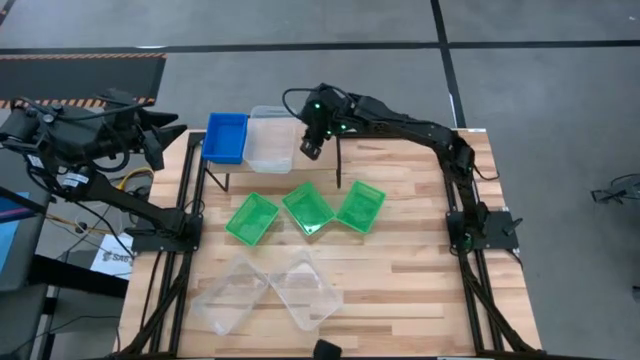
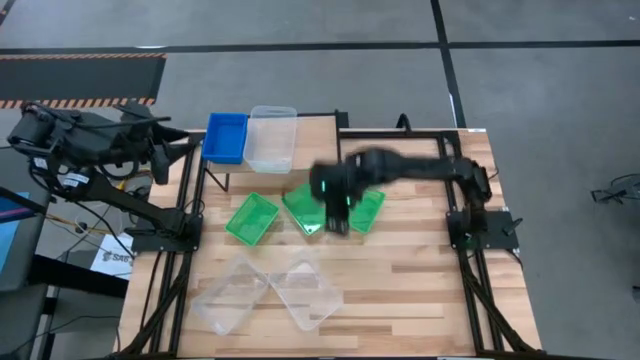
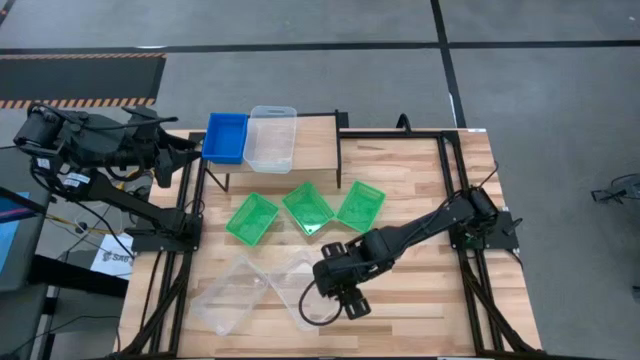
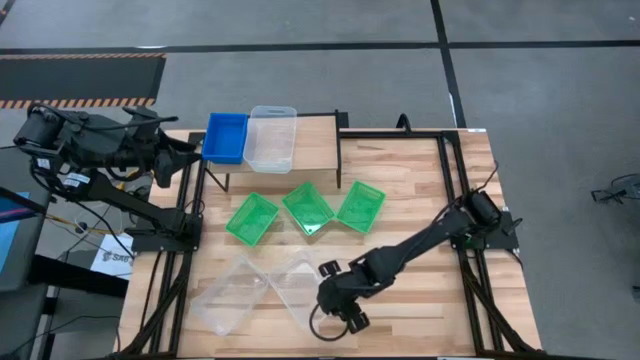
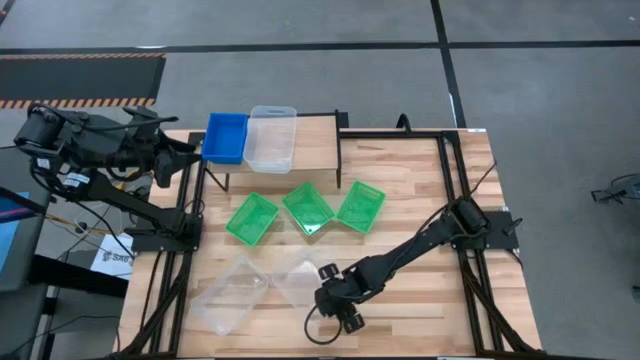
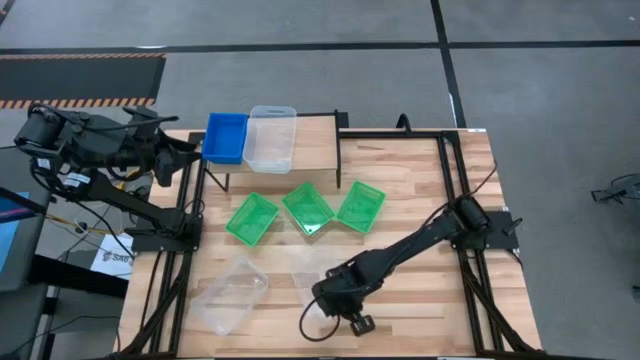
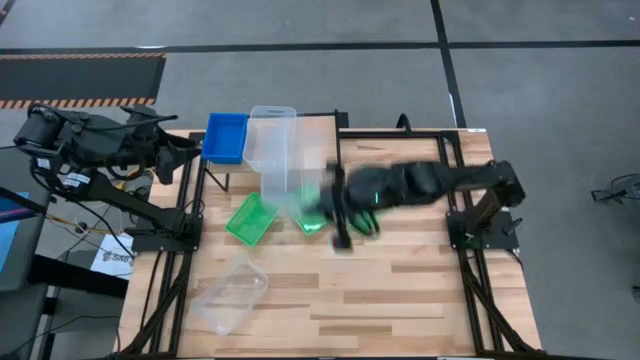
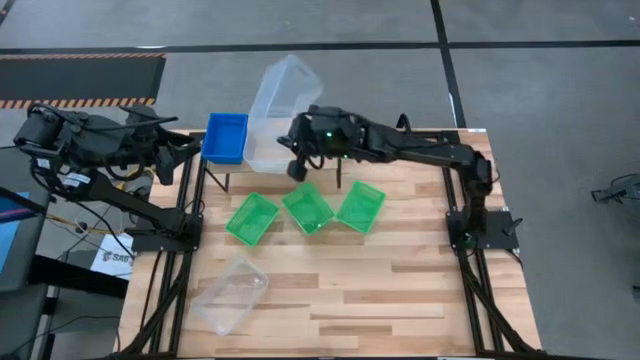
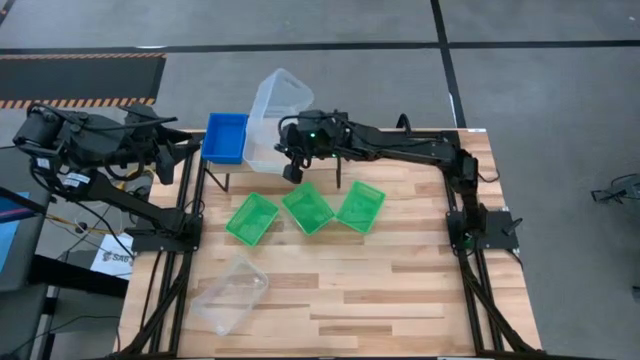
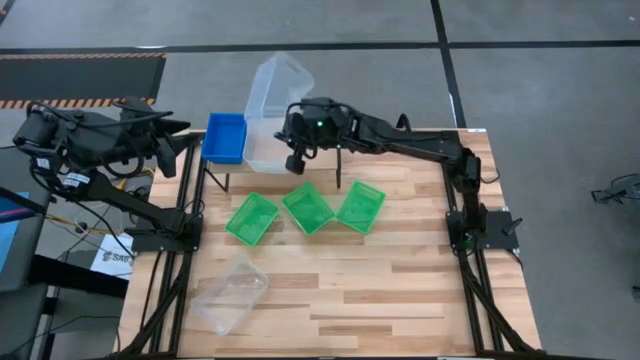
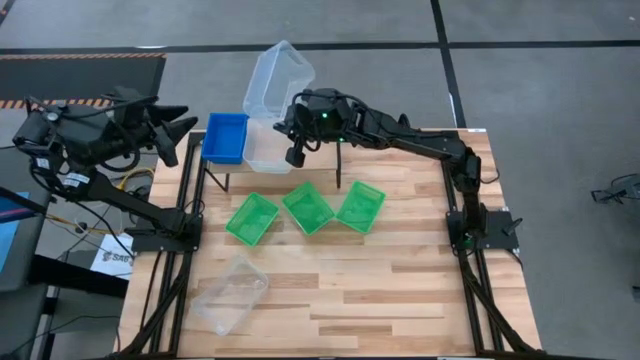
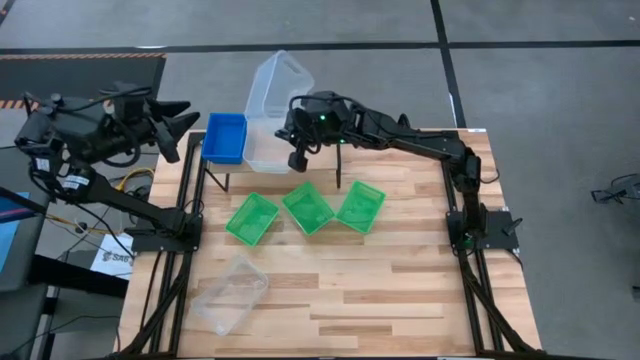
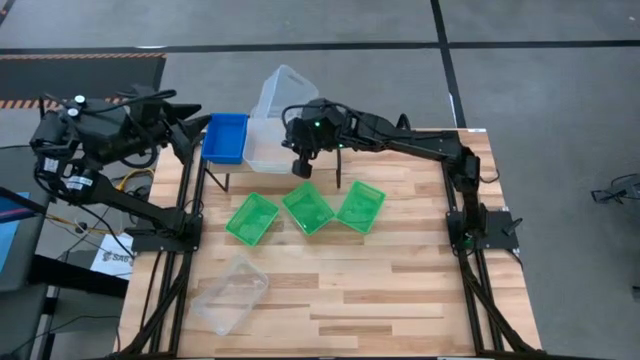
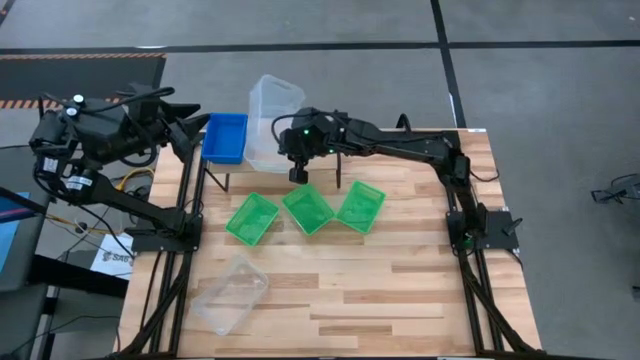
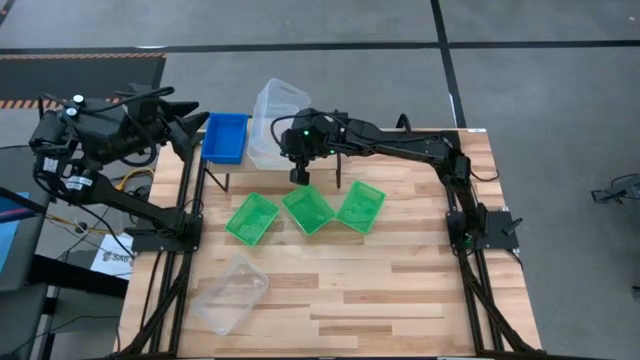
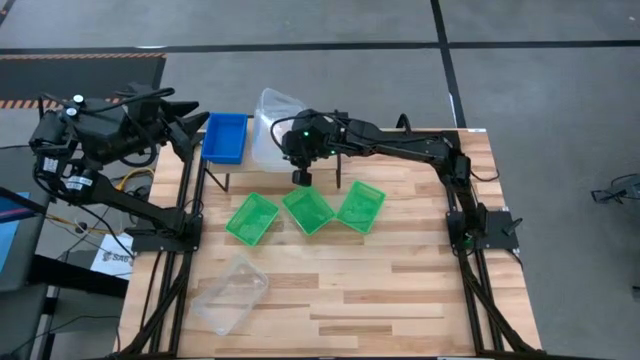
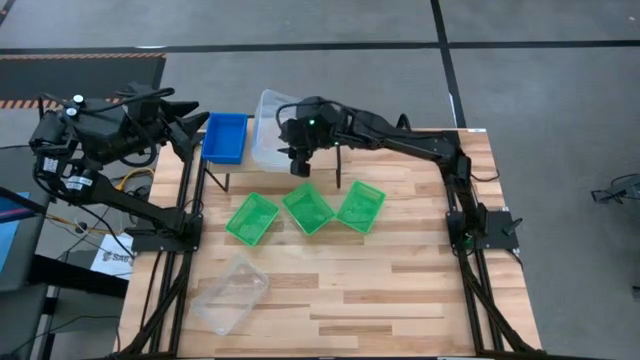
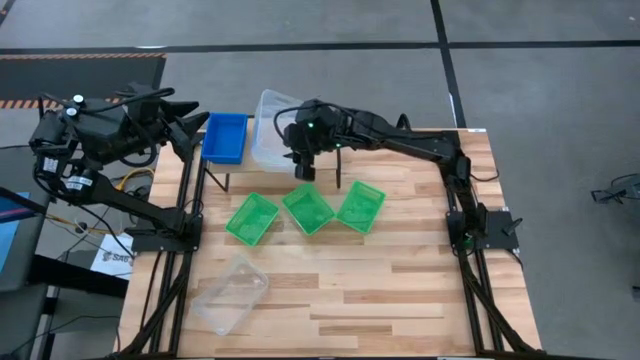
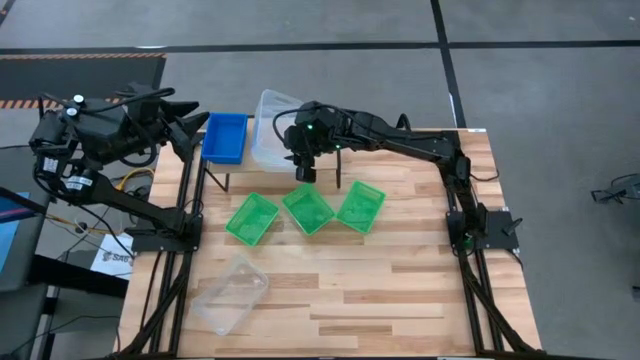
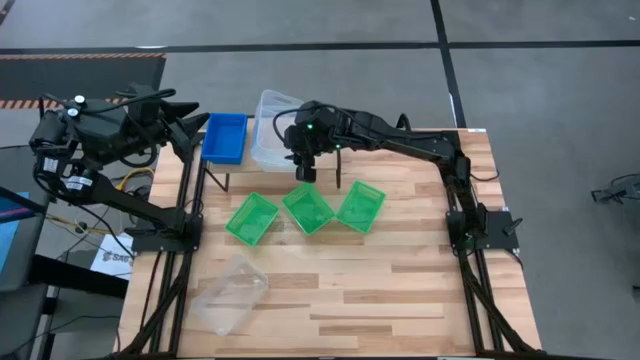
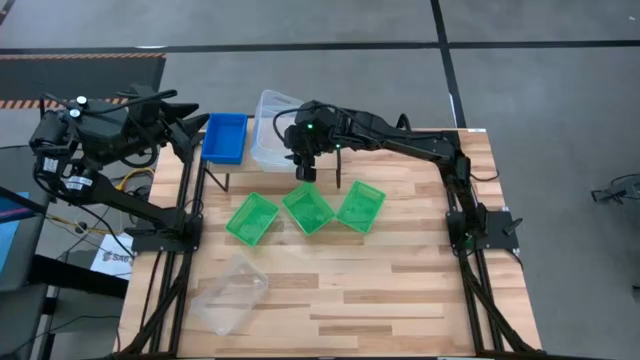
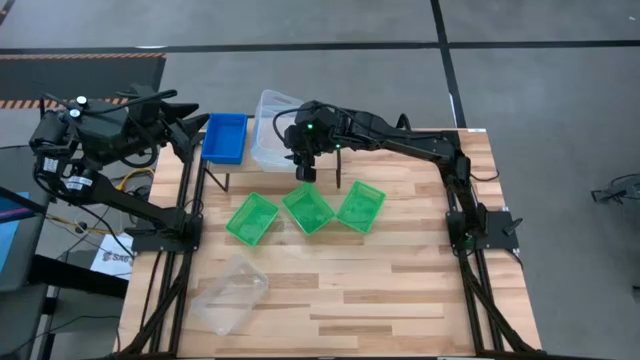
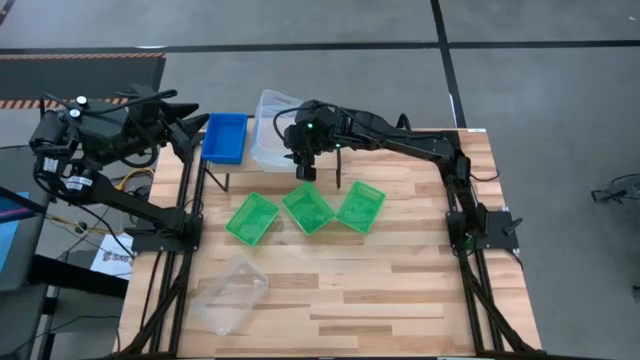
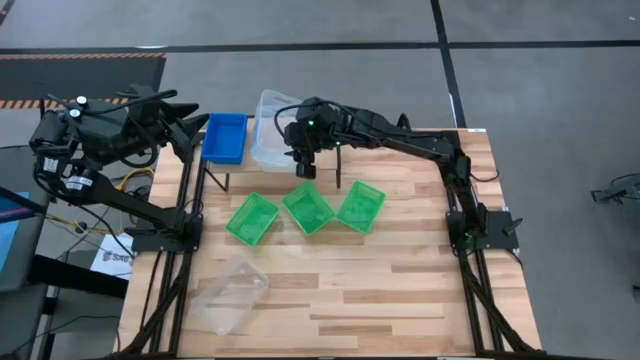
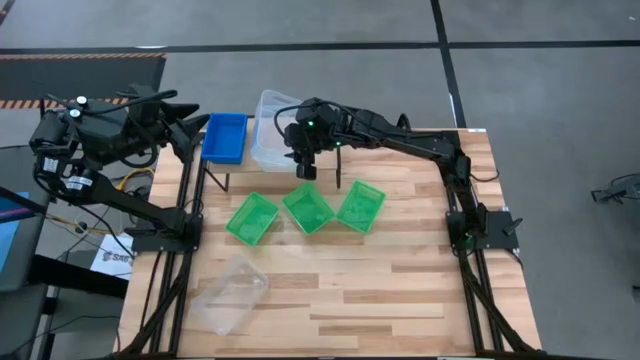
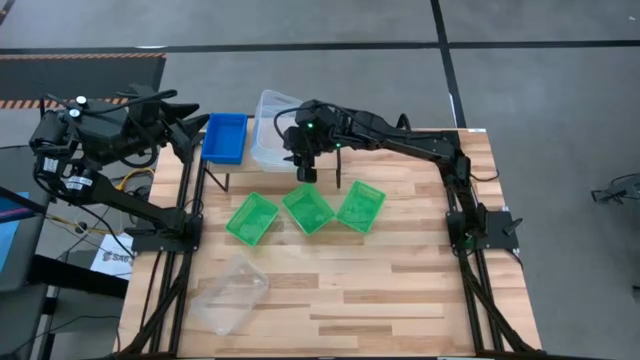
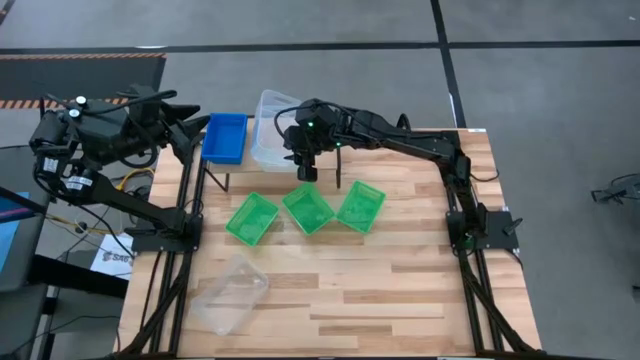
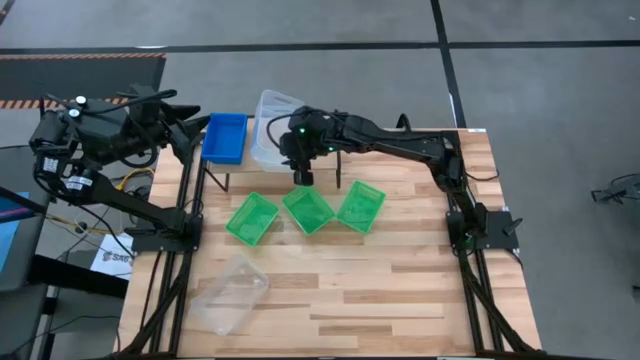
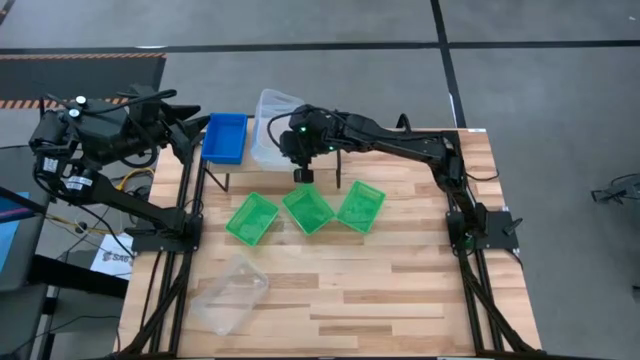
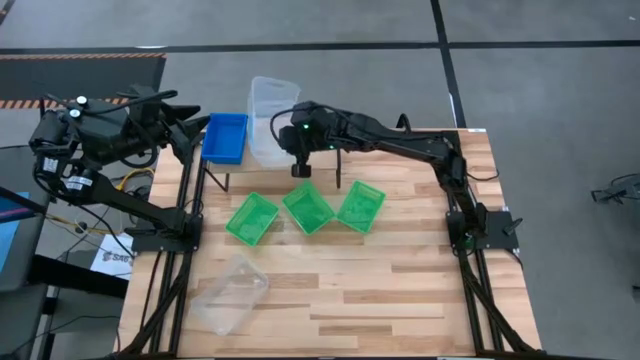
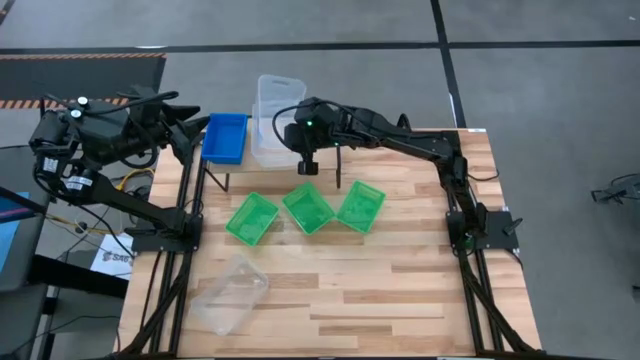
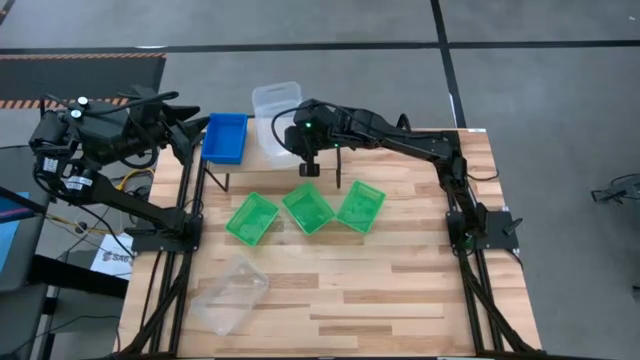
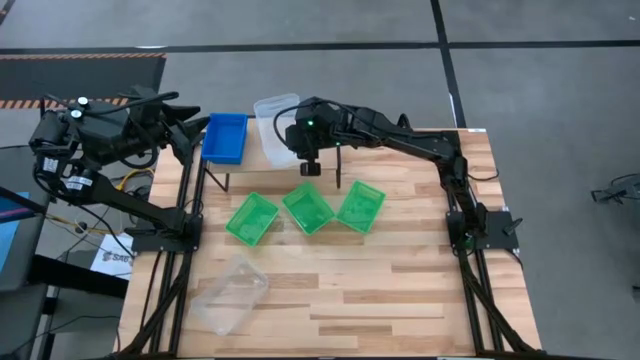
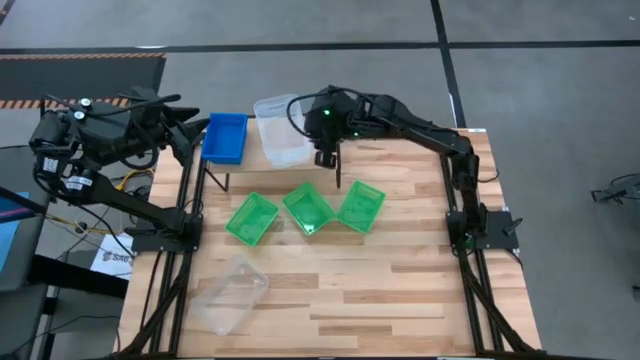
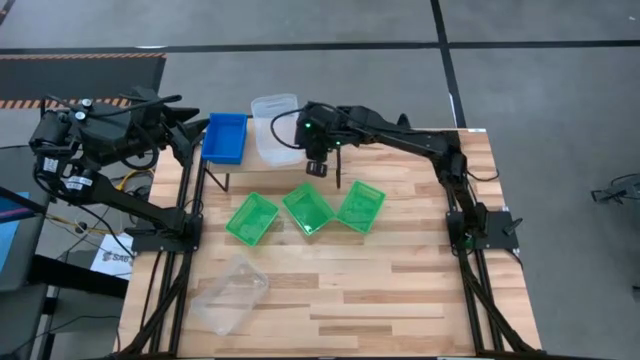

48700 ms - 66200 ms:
Task: Stack baskets on shelf by color
Stack the right transparent bin on top of the other transparent bin on the shelf

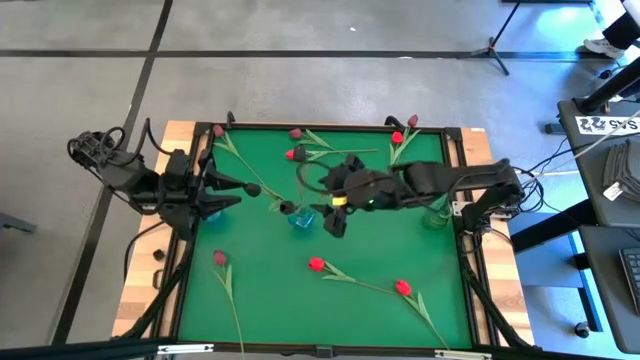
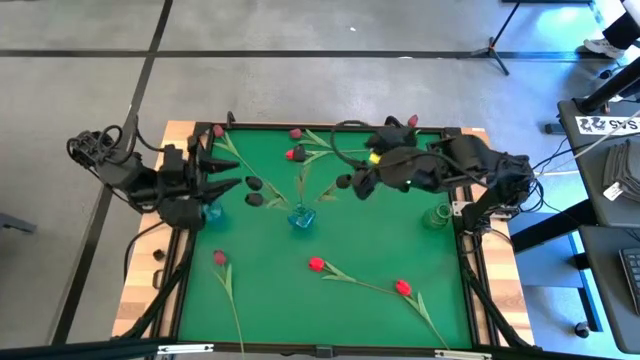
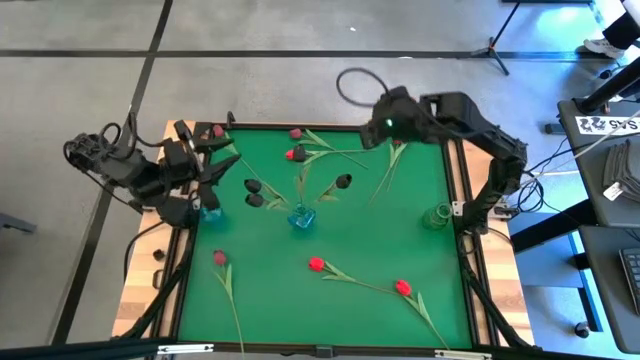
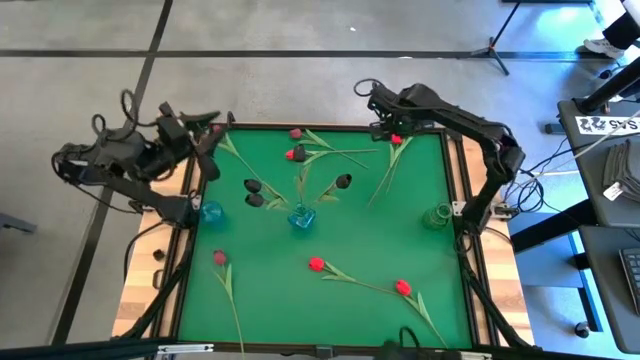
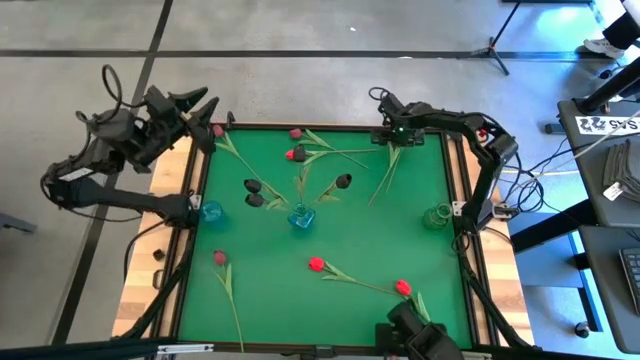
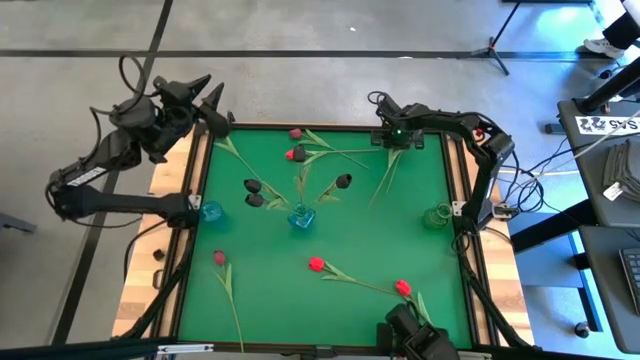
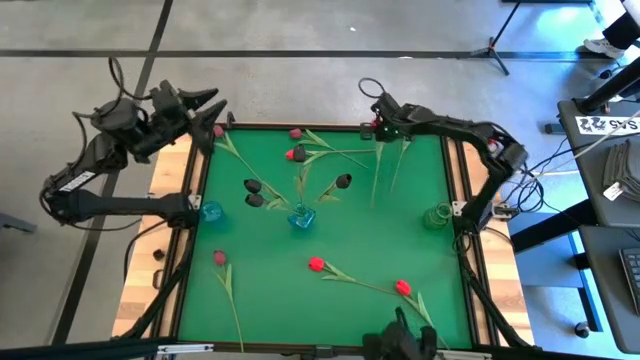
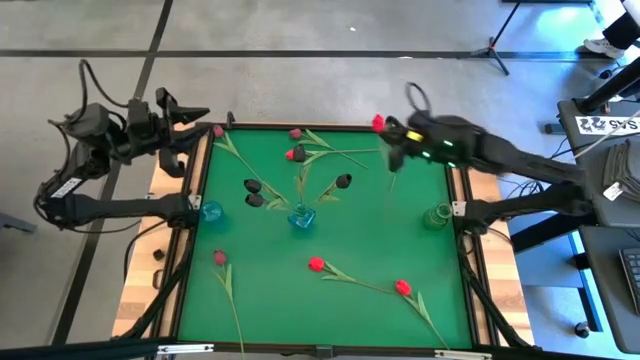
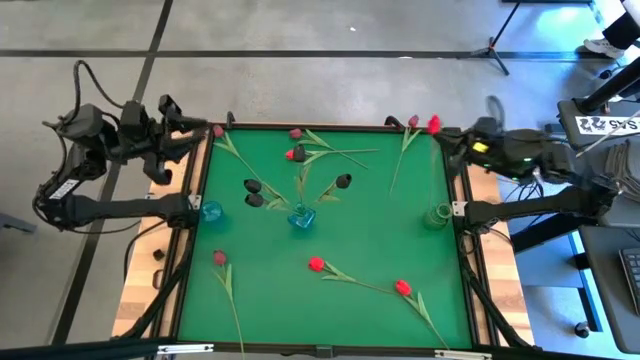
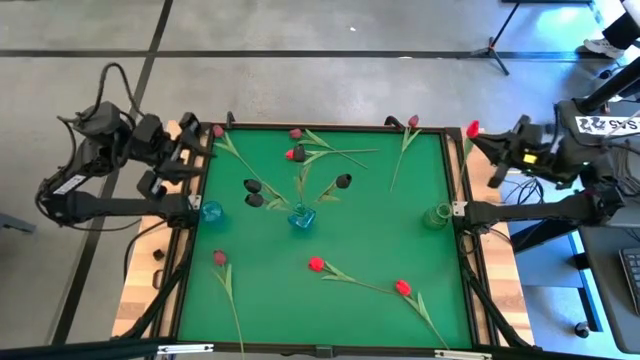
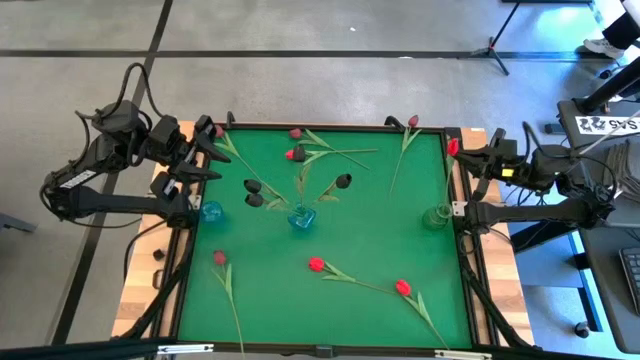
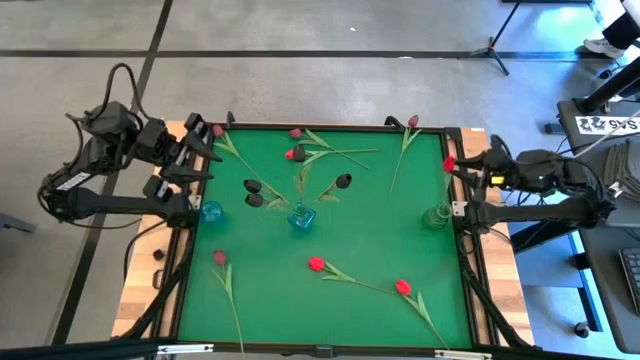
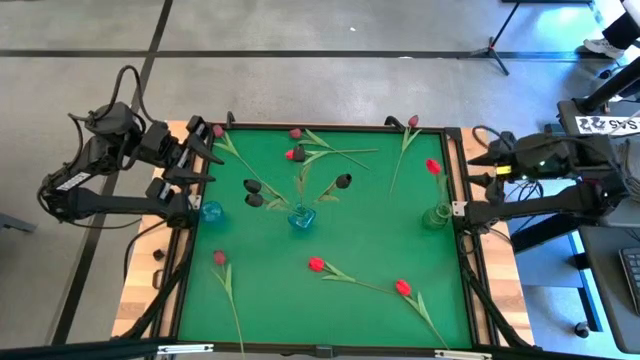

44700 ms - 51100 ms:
Task: Sort flowers into vase by color
Put the top right red tulip into the green vase
